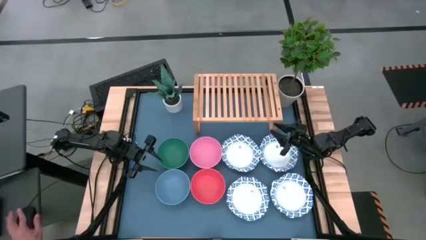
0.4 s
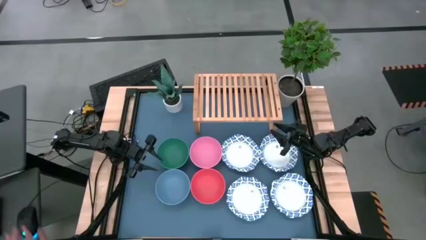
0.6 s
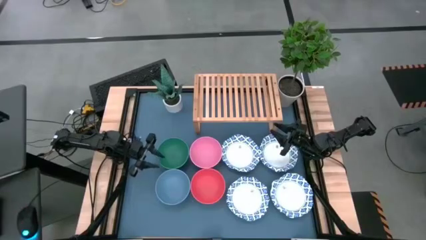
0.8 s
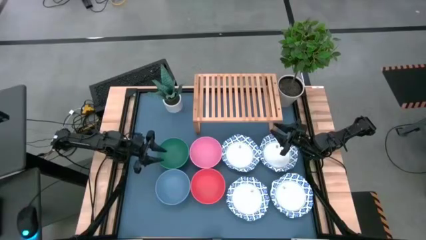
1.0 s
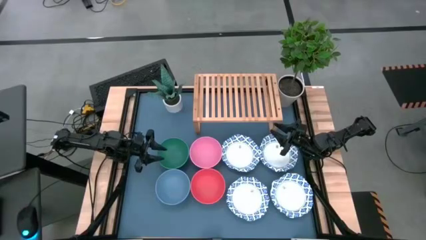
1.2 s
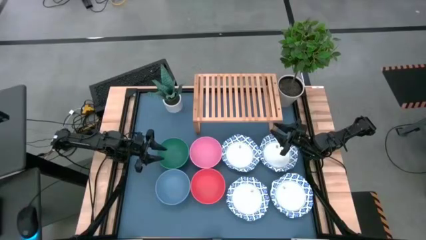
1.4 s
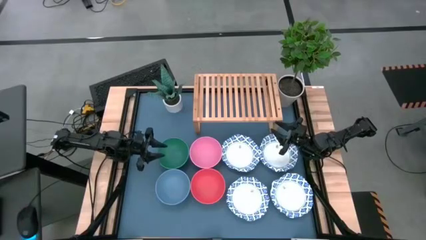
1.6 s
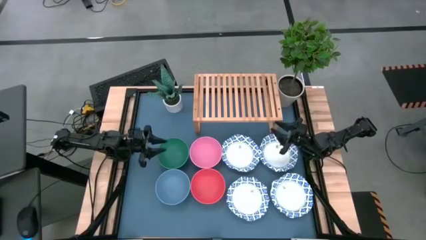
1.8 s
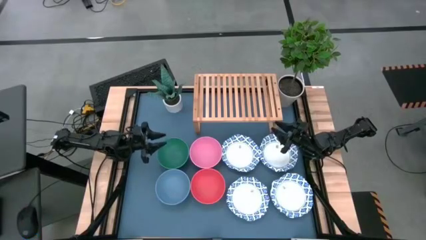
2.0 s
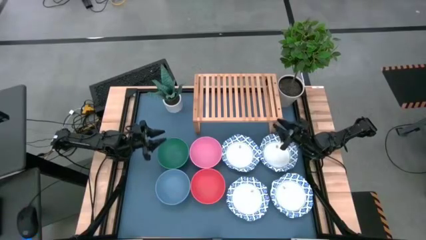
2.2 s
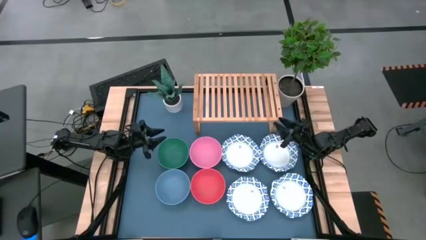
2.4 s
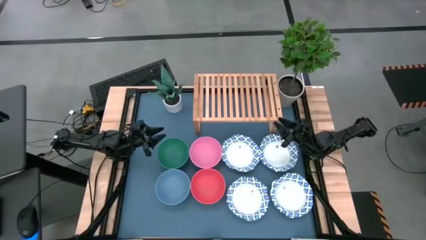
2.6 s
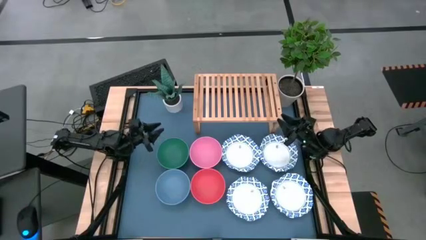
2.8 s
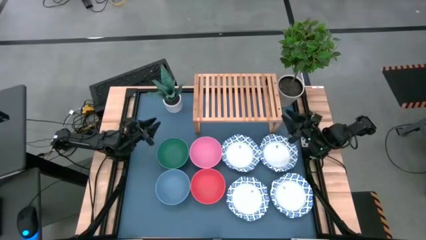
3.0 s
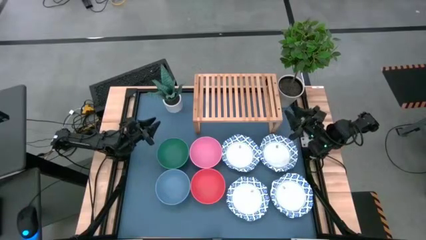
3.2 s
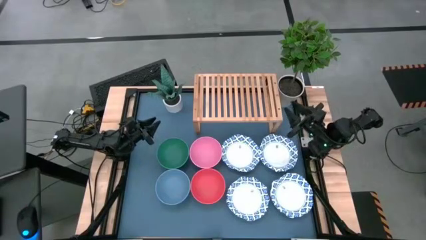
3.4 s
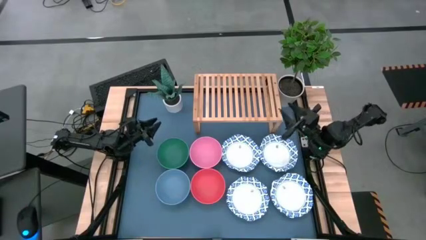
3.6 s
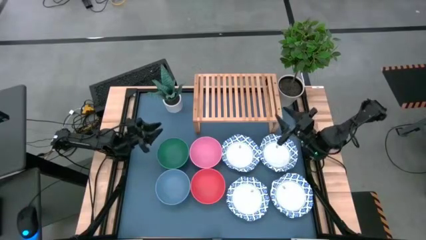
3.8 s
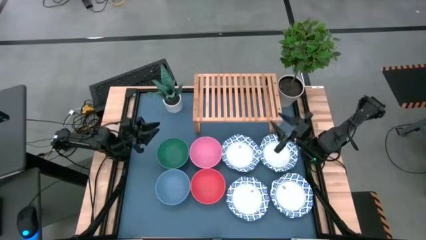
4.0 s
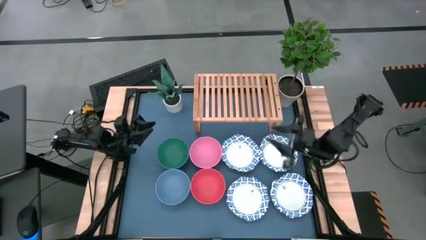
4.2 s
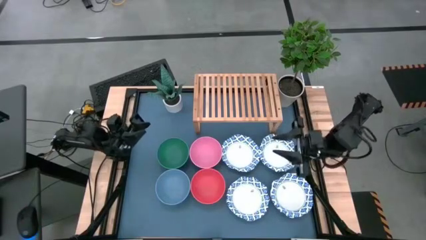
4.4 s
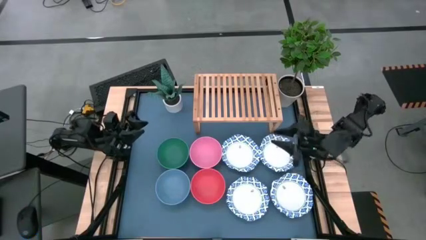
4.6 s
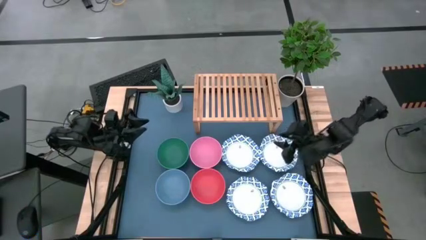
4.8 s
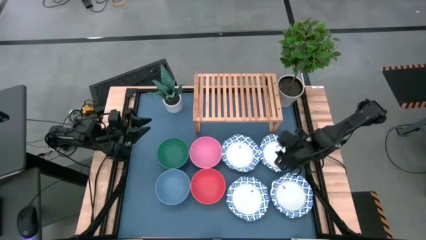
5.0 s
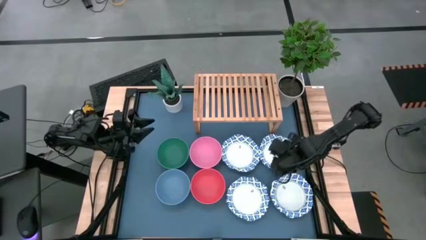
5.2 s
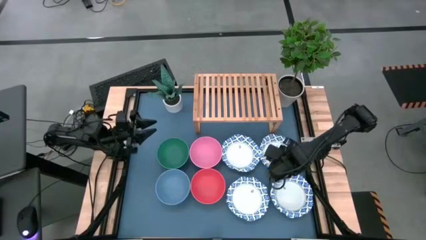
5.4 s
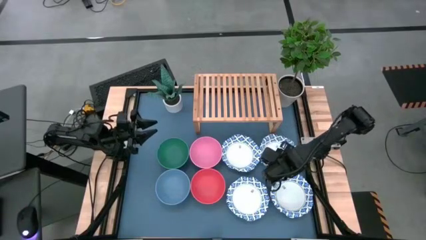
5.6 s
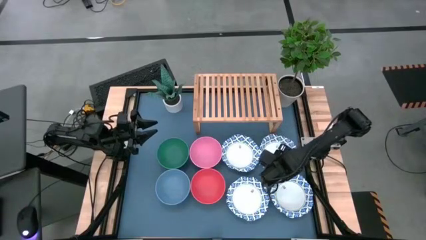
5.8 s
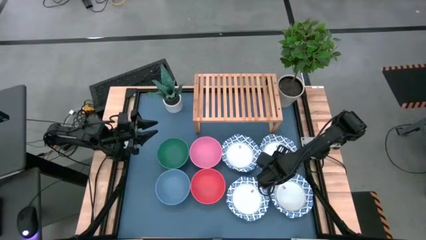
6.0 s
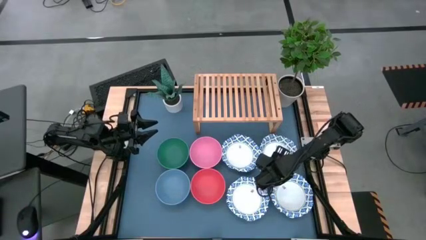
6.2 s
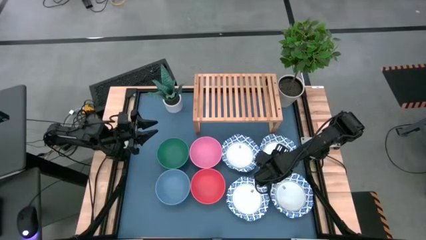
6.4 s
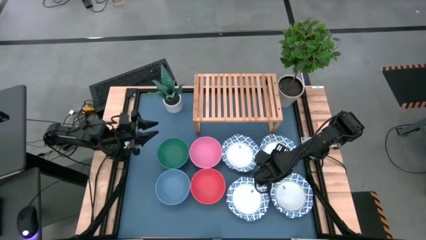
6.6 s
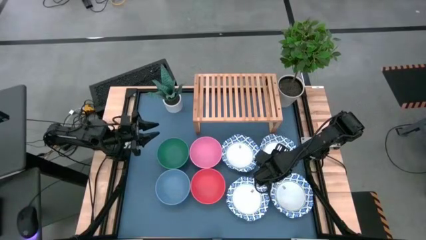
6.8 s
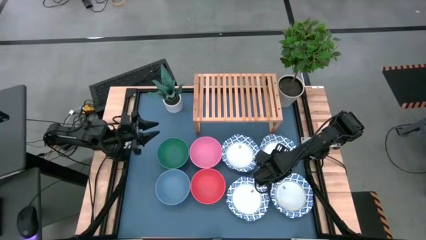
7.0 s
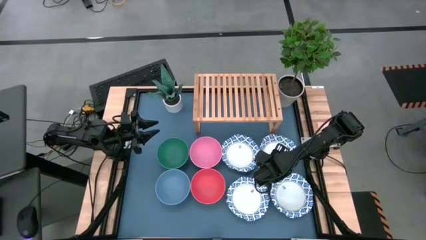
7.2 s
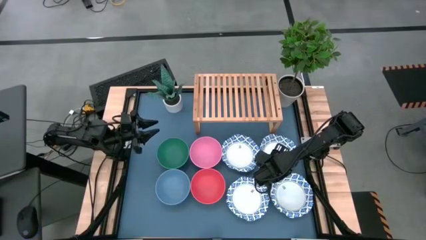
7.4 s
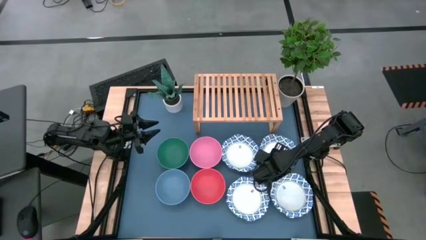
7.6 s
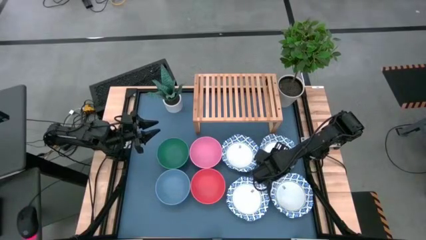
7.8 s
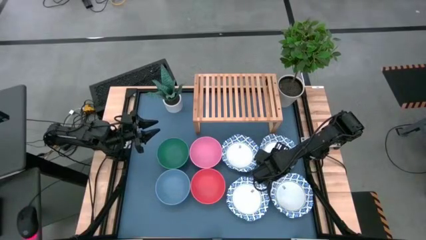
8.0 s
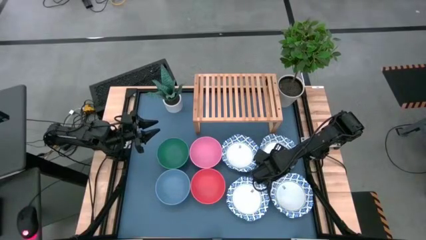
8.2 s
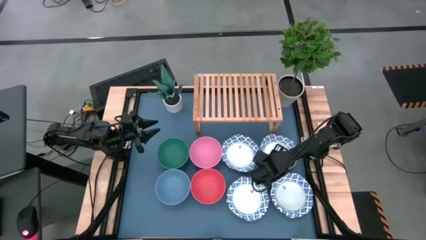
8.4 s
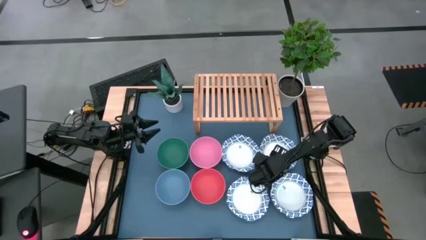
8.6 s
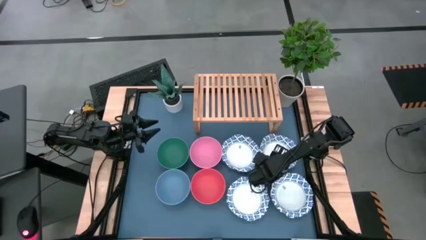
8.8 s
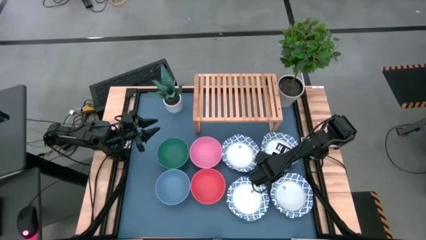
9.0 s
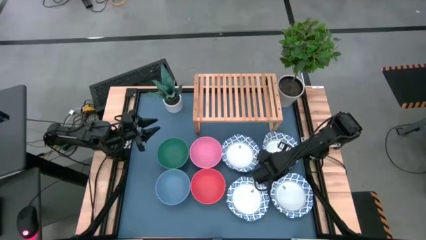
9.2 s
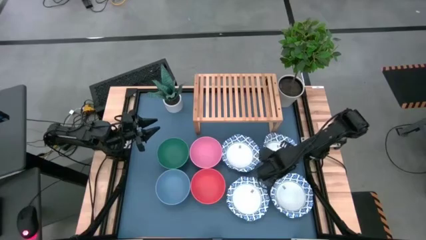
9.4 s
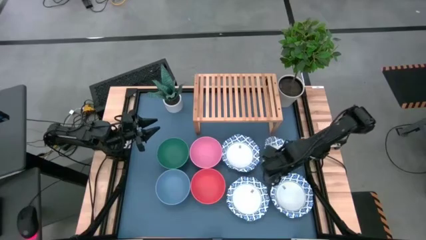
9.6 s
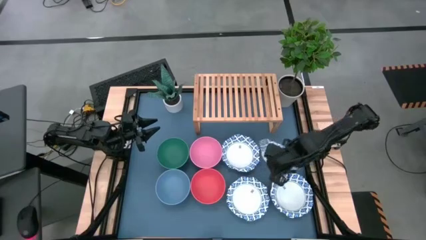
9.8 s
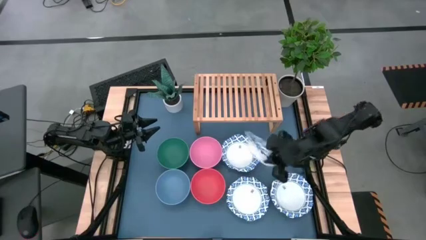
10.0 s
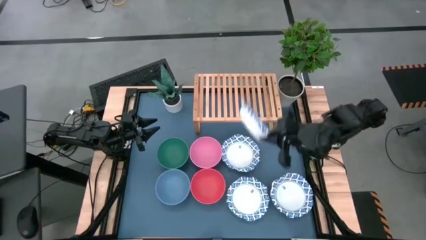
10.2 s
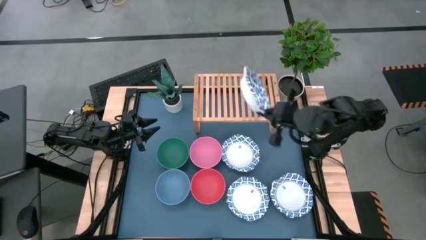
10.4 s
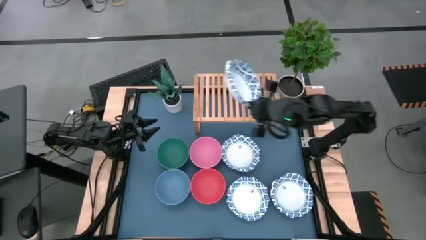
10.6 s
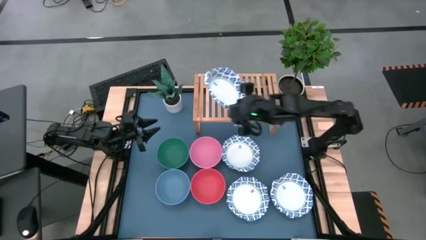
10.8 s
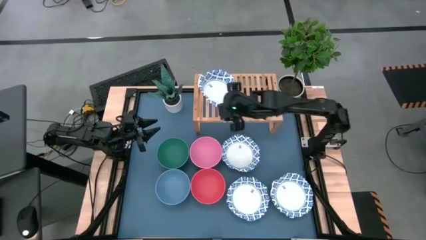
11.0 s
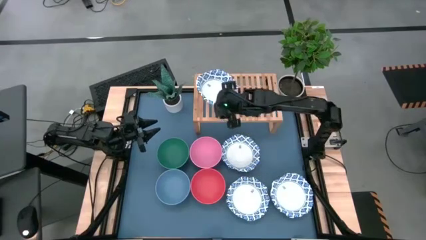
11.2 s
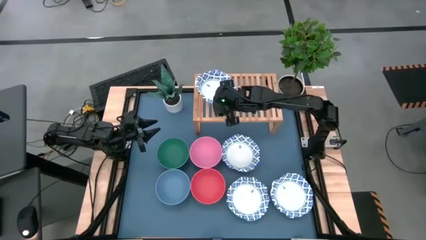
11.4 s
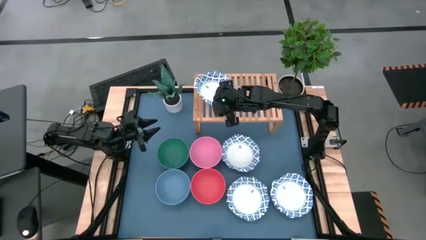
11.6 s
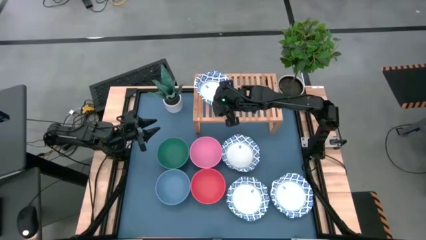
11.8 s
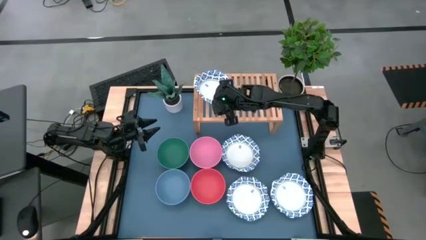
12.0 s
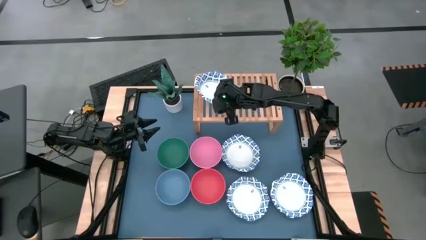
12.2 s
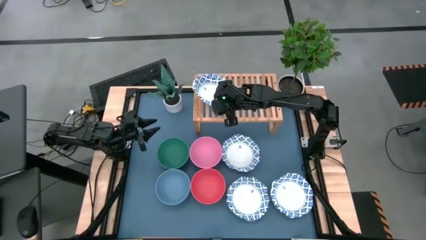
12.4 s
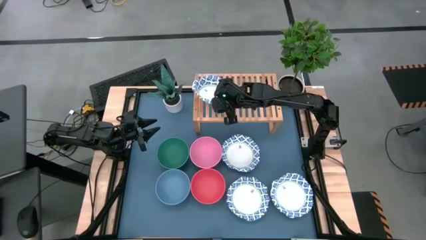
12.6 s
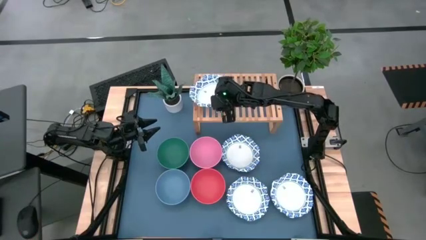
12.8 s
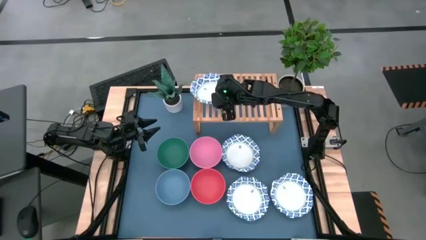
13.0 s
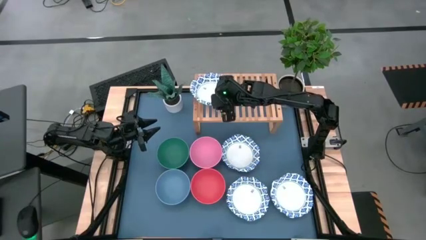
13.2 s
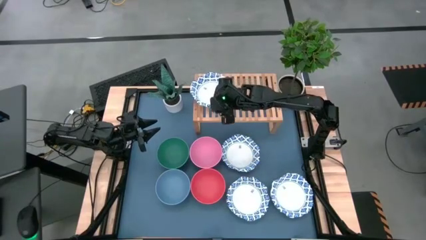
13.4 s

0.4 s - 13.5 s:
Task: Place and stack bowls onto a shelf
Put the white patterned bowl on the shelf
